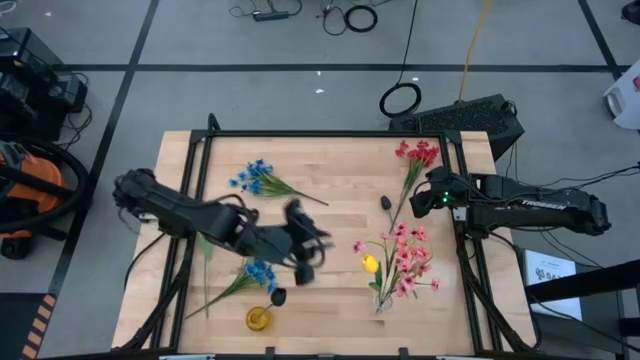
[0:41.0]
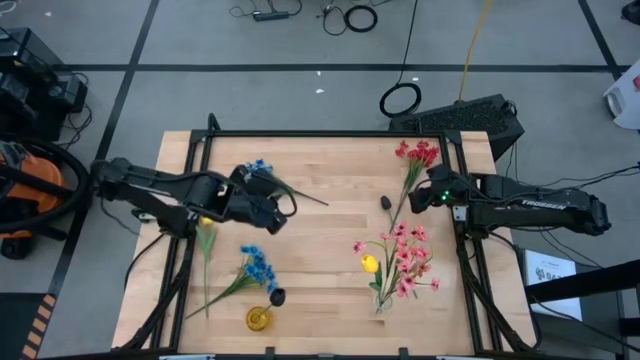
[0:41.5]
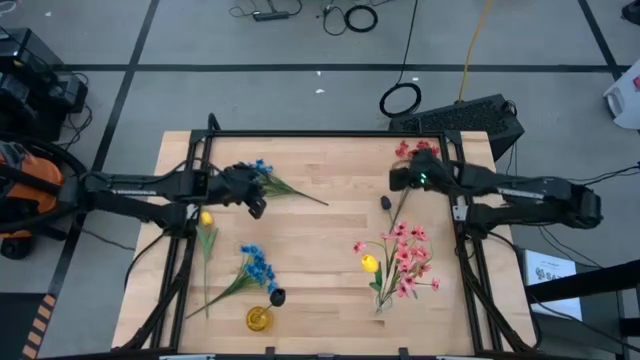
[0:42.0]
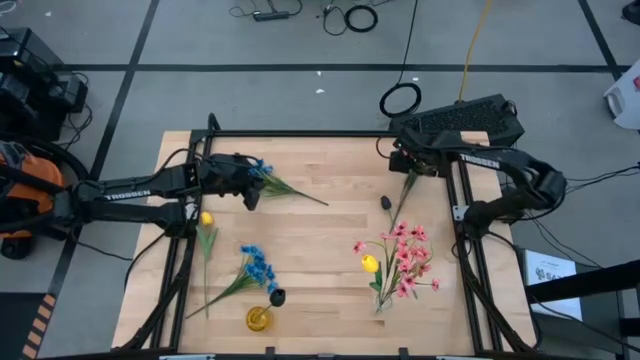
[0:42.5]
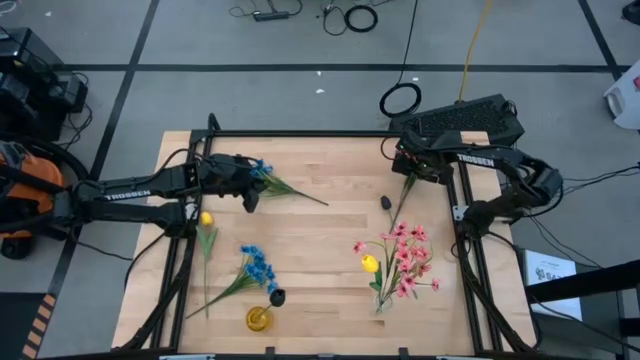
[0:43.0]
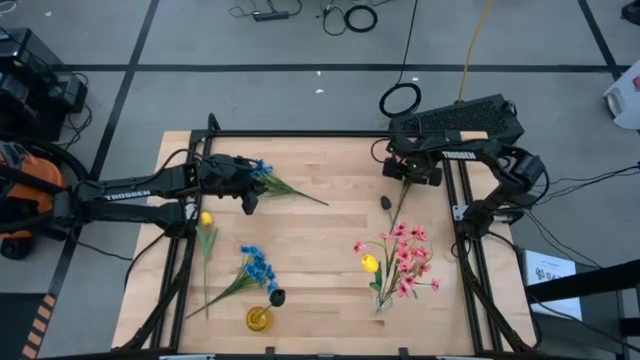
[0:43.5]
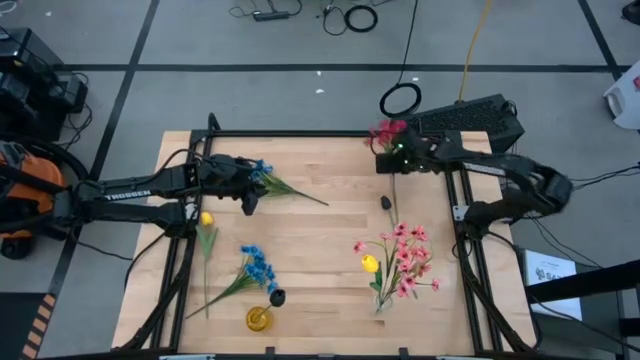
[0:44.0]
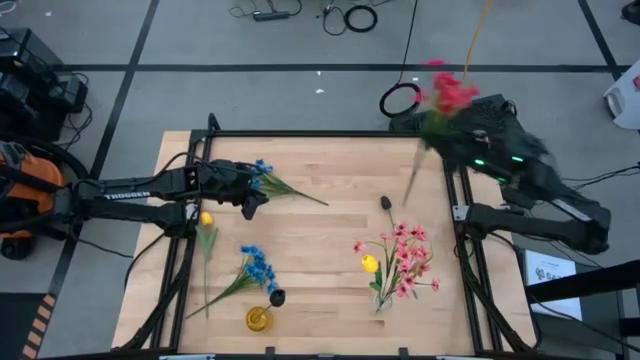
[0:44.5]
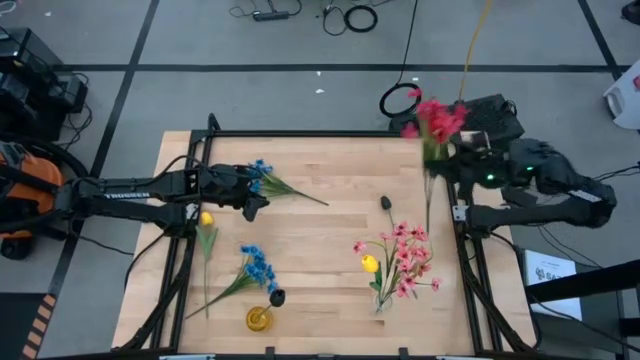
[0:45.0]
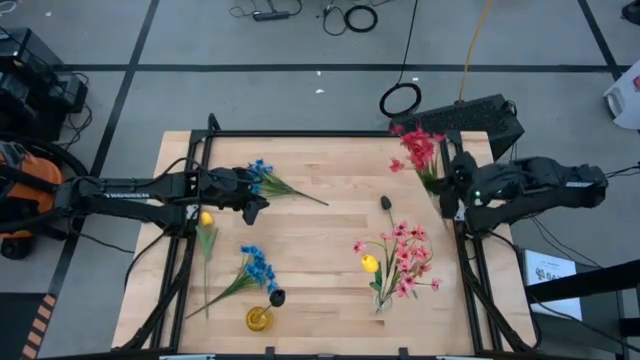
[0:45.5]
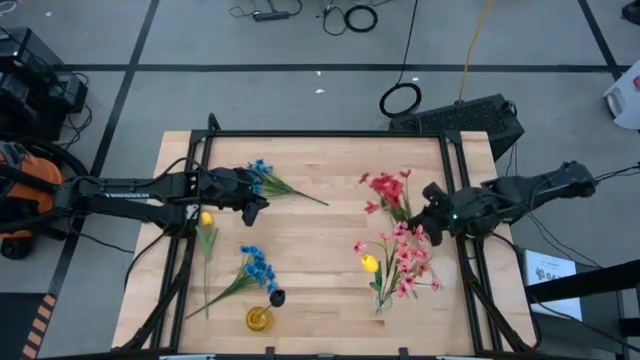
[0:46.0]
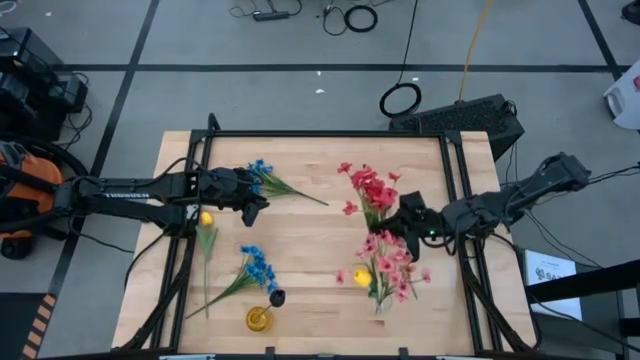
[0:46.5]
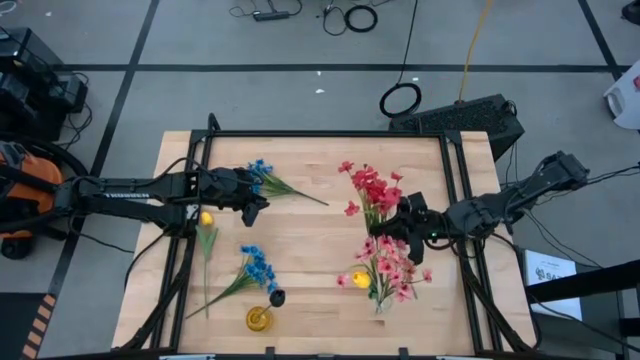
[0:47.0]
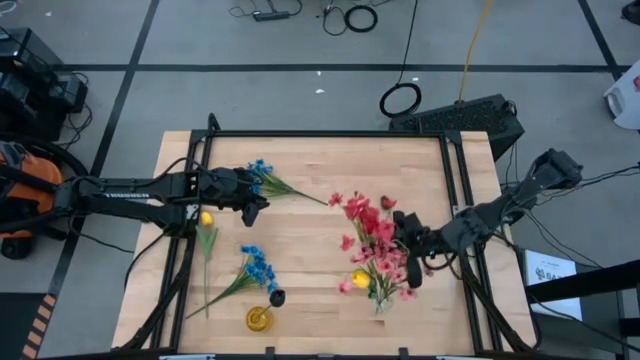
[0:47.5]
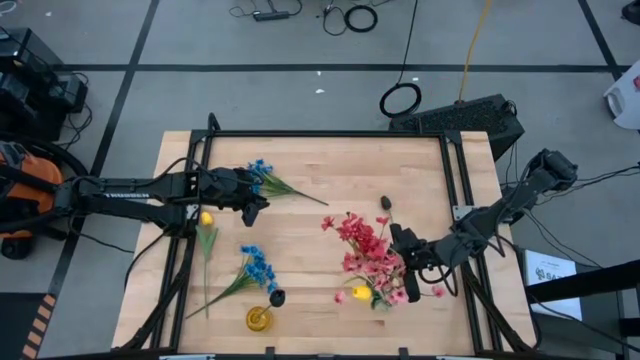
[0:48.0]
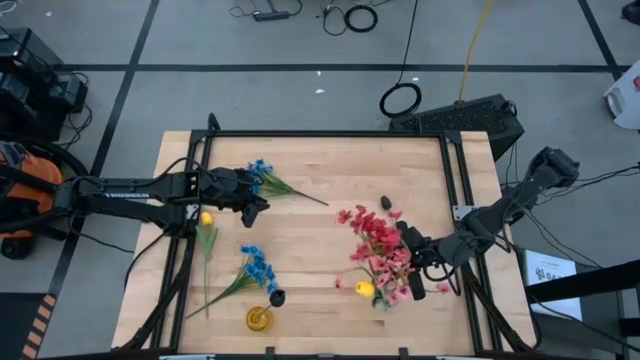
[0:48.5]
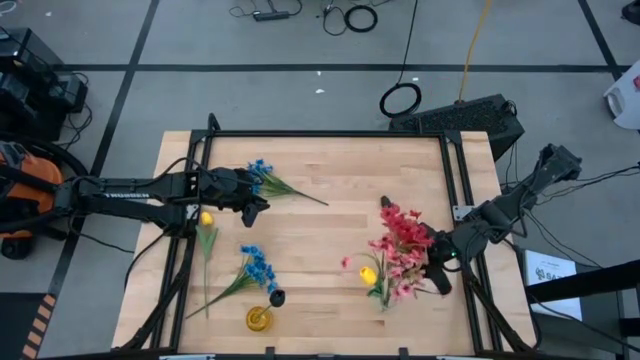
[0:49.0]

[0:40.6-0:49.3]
Task: Sort flowers into vase by color
Put the red flowers into the transparent vase

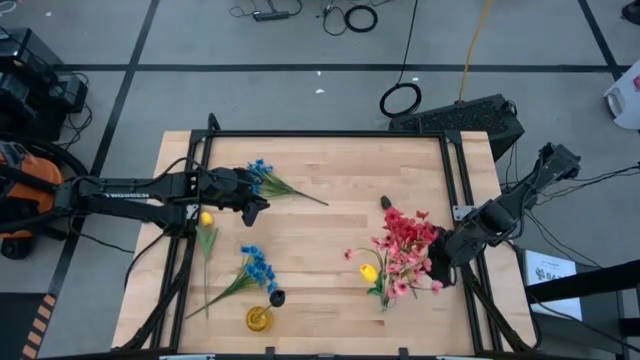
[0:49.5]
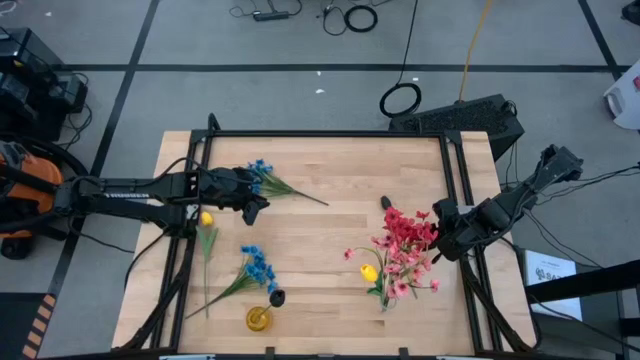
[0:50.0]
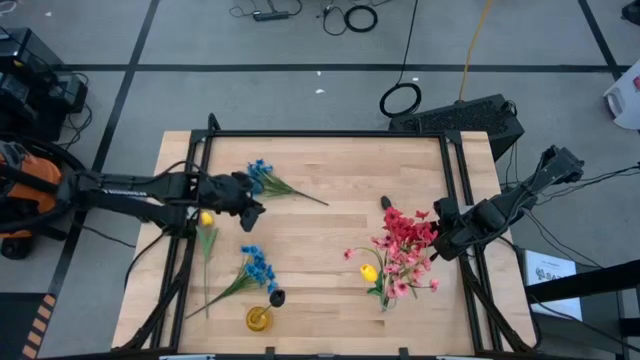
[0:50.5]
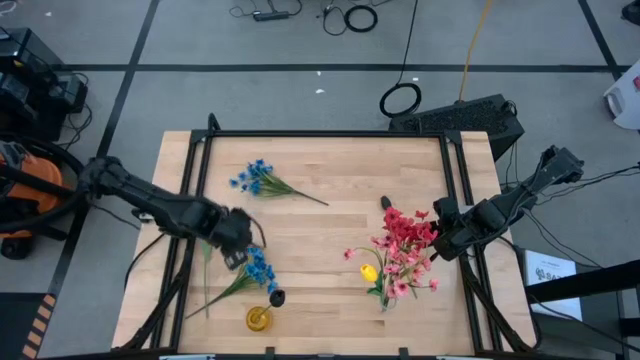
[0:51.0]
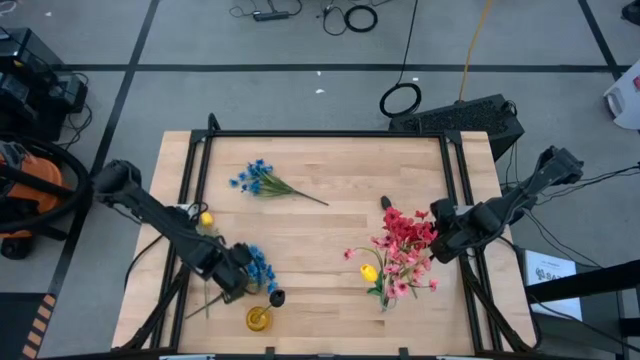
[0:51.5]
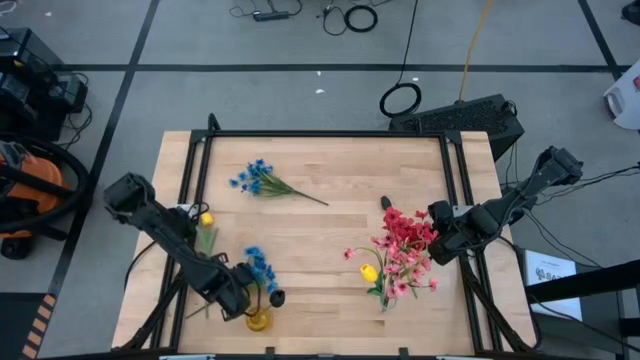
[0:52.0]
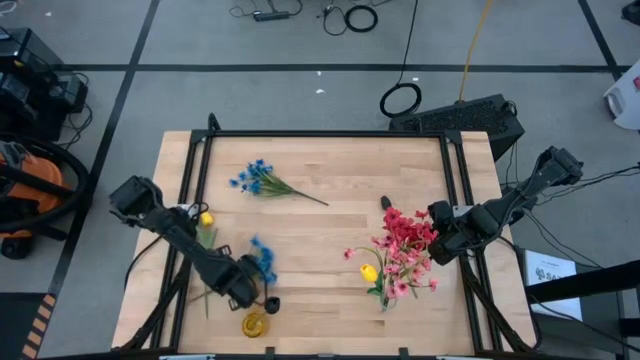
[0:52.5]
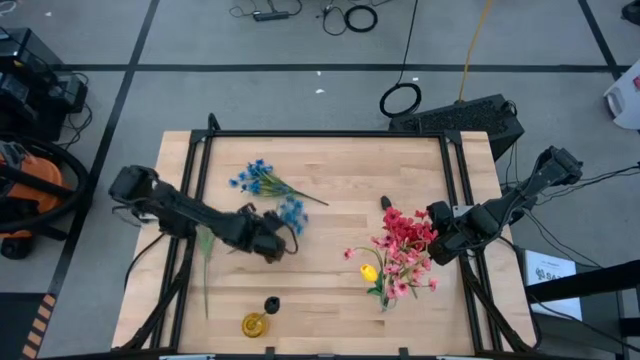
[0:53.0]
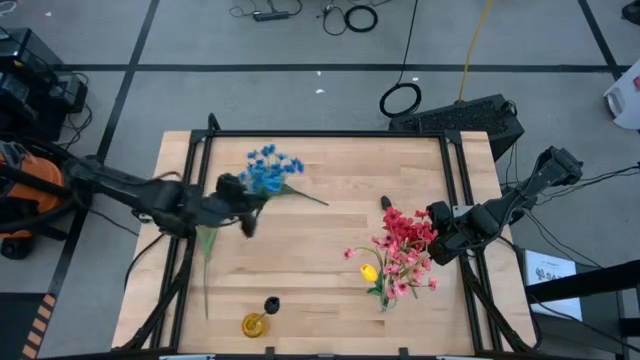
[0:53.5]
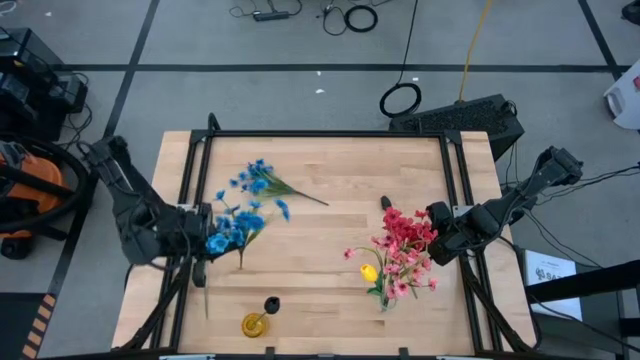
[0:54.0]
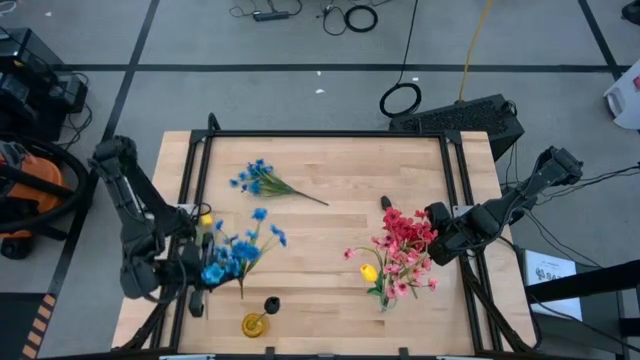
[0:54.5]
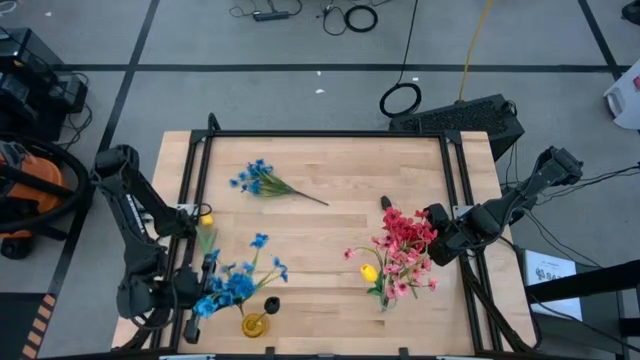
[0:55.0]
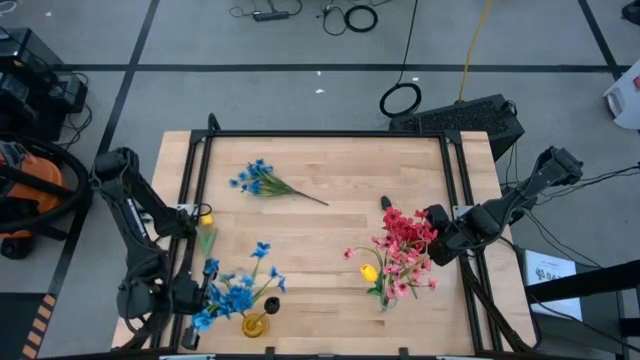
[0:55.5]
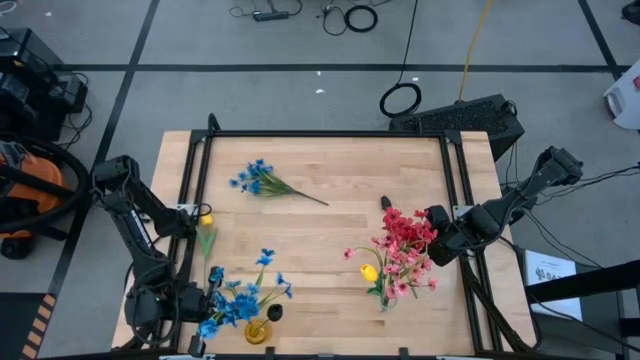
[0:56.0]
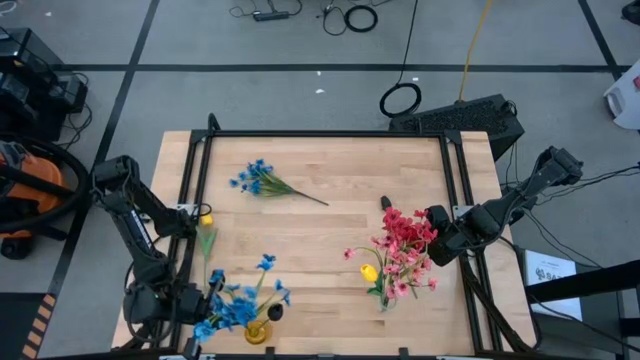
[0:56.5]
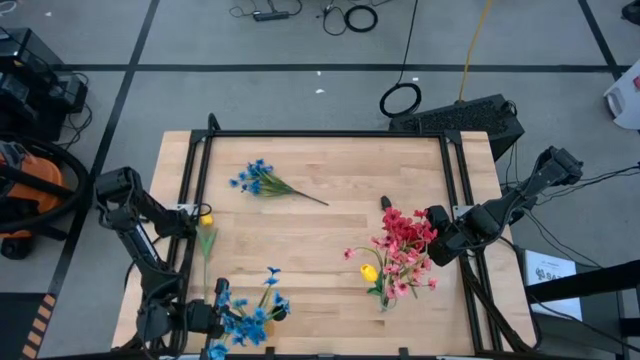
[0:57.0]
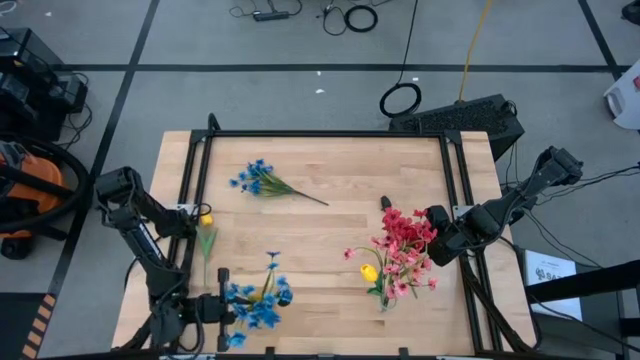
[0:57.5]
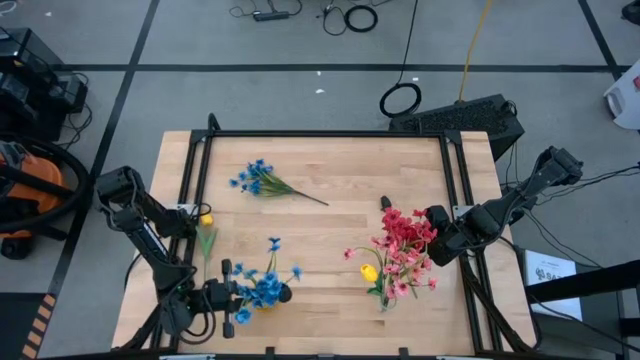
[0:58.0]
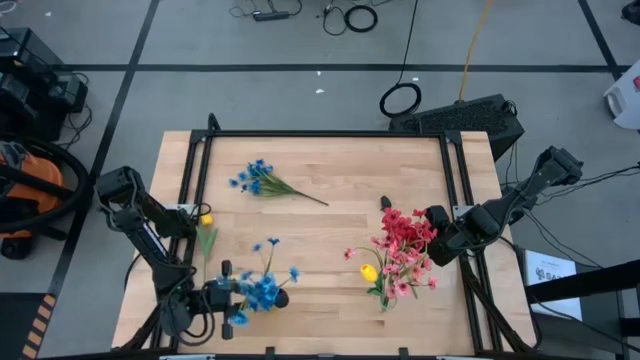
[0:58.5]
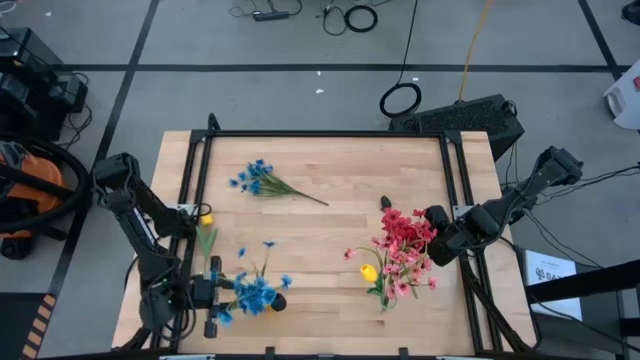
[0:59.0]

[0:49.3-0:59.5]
Put the bottom blue flowers into the yellow vase

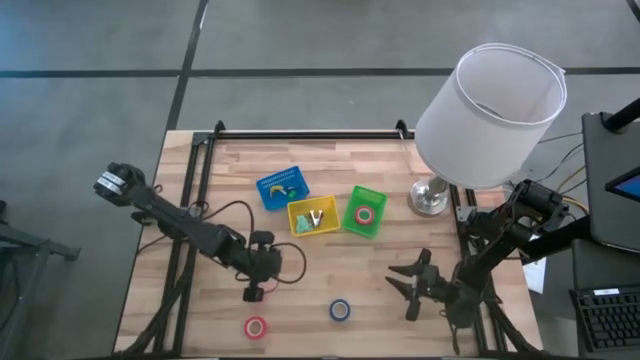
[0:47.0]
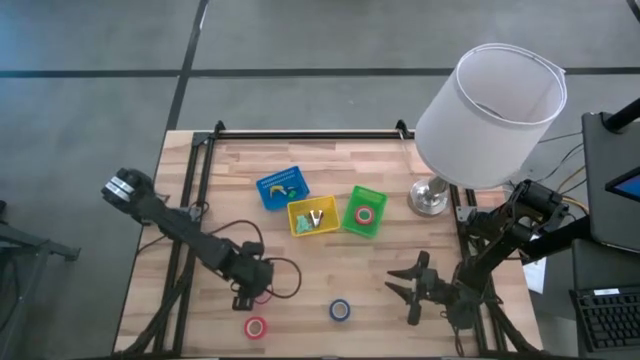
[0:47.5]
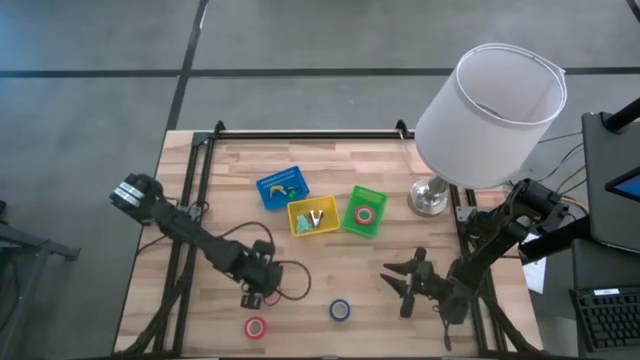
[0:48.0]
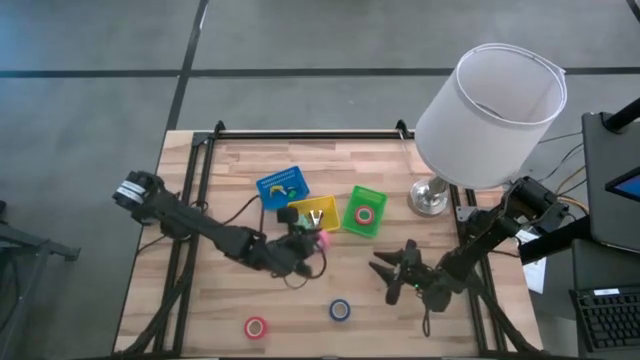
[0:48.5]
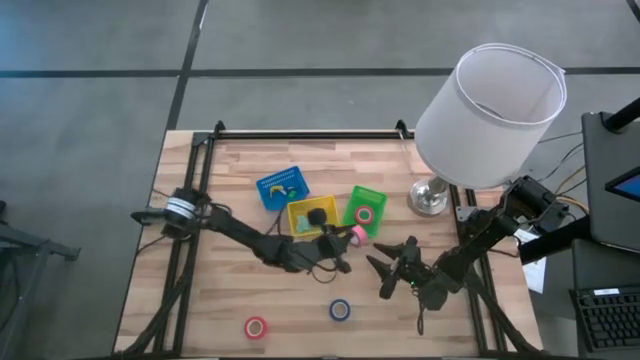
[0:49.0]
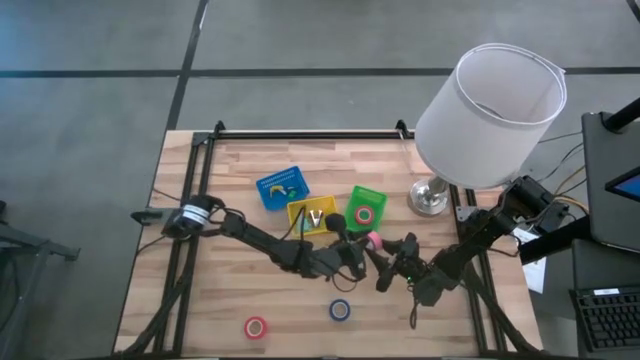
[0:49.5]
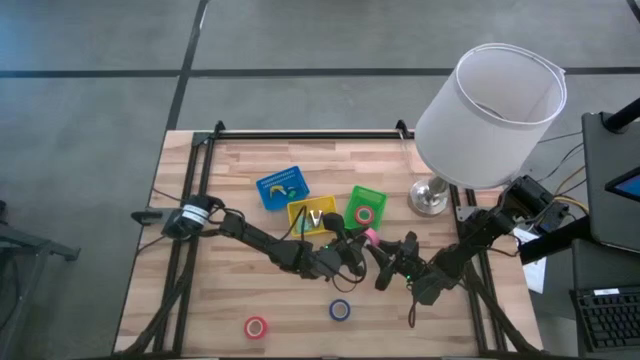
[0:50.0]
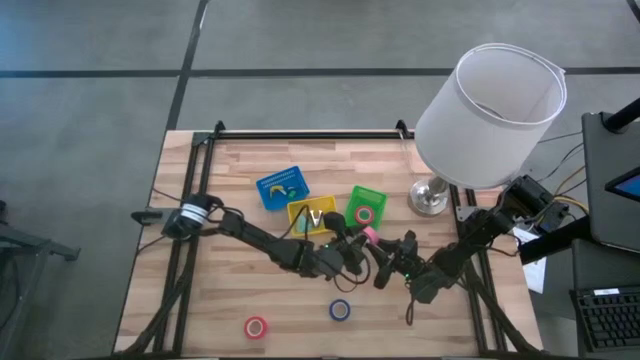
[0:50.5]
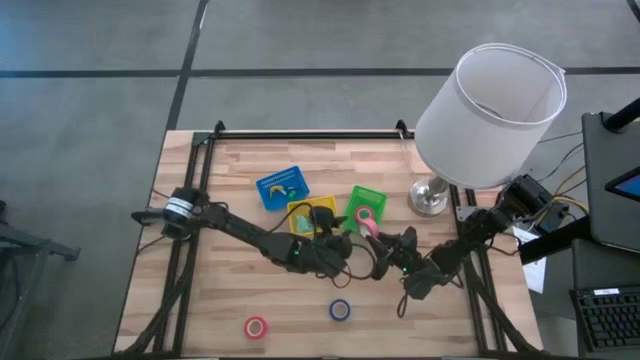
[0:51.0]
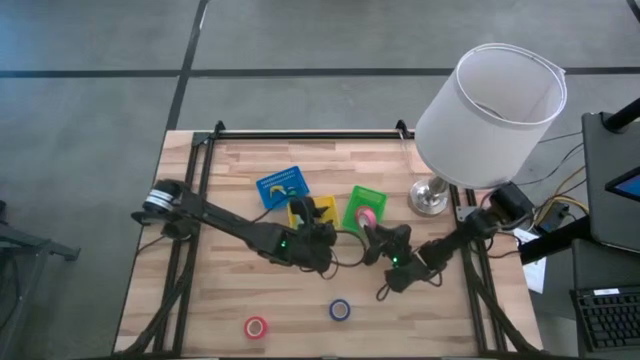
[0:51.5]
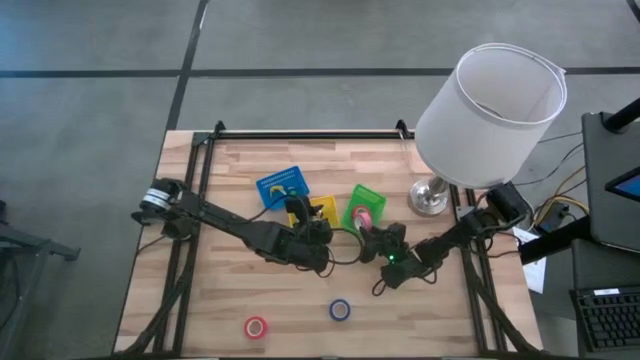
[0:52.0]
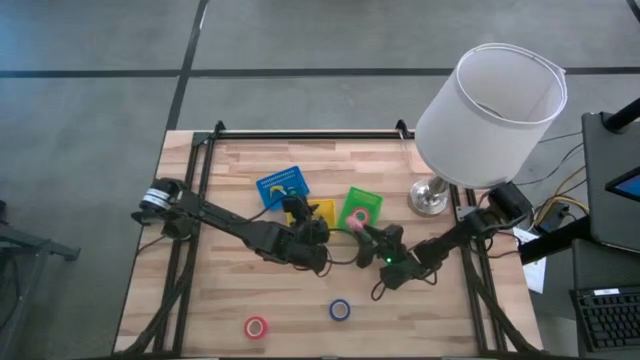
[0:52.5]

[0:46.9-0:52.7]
Task: Pick and place Stapler, Stapler remover, tape
Put the pink tape into the green bin
